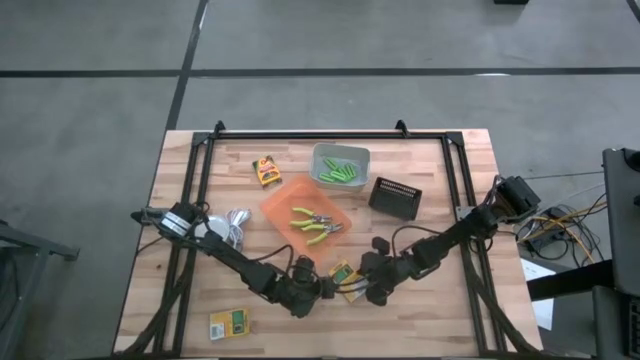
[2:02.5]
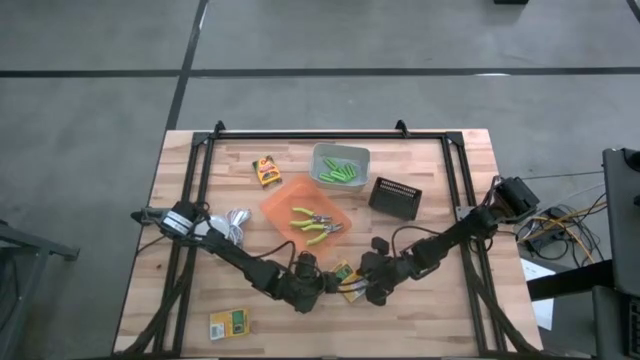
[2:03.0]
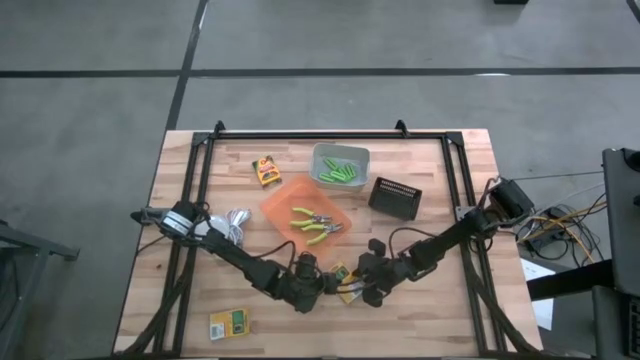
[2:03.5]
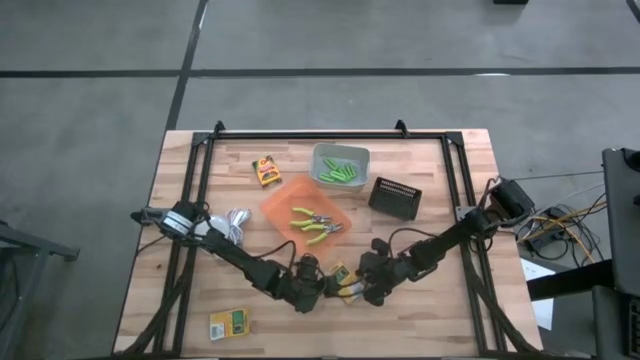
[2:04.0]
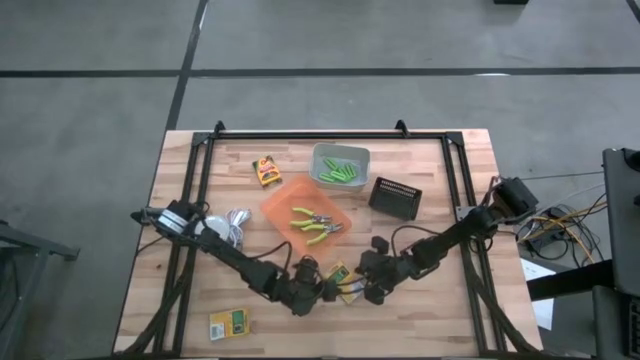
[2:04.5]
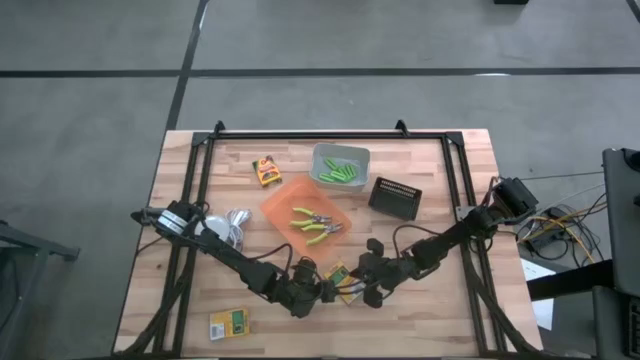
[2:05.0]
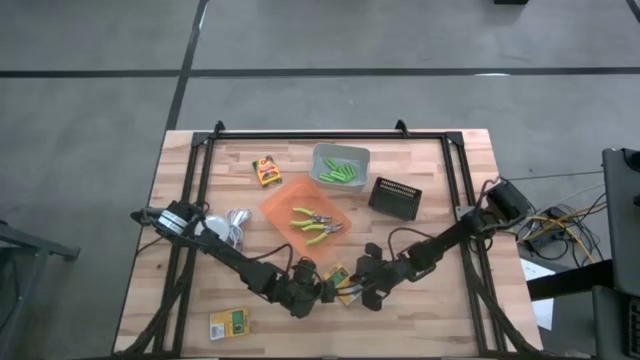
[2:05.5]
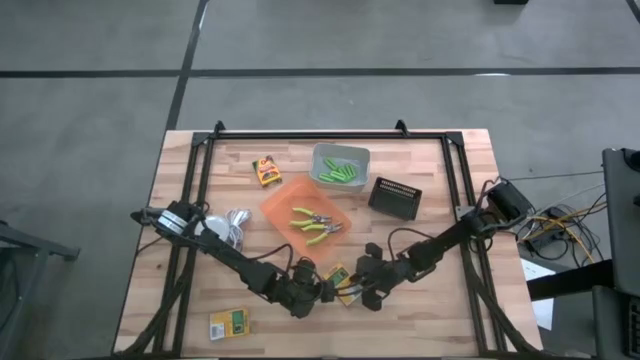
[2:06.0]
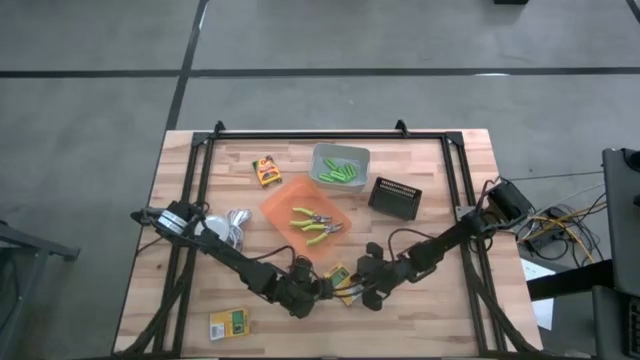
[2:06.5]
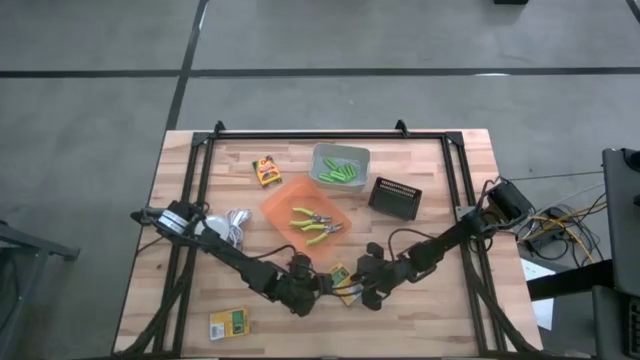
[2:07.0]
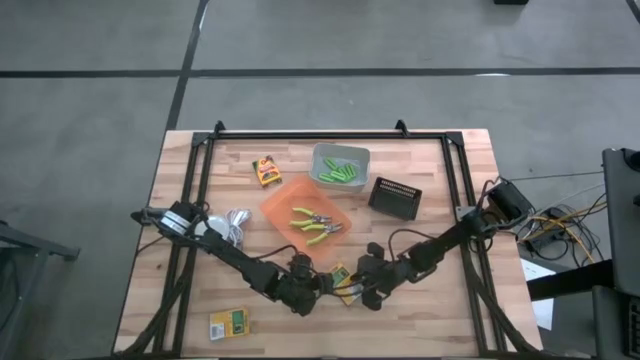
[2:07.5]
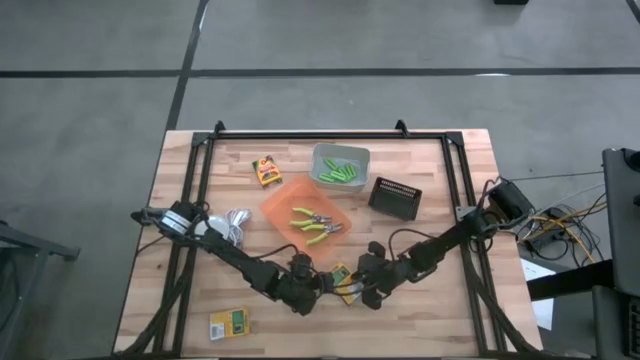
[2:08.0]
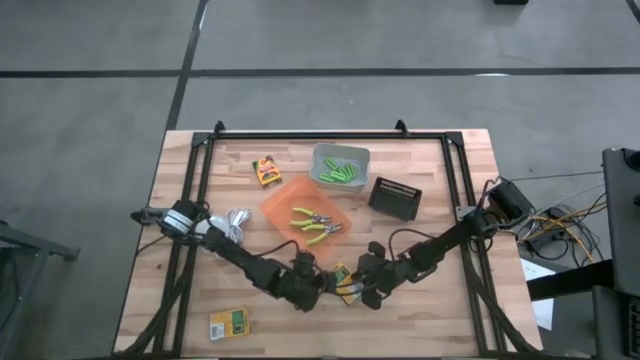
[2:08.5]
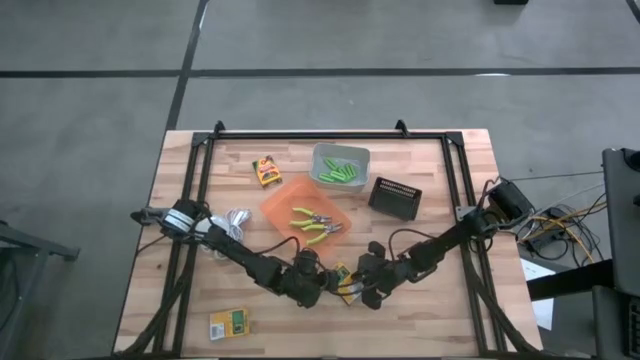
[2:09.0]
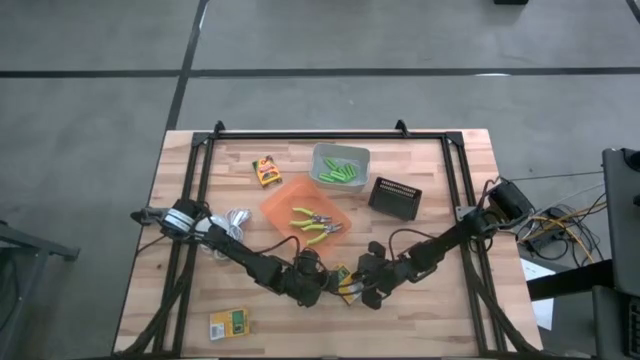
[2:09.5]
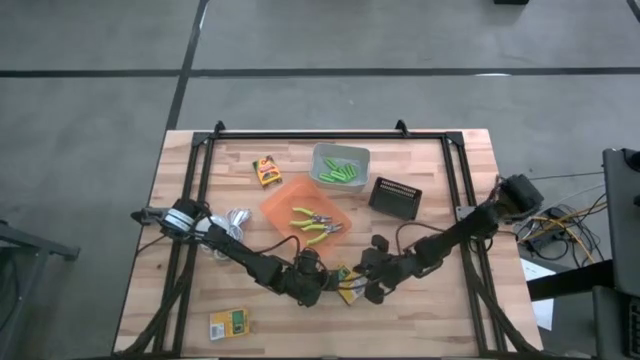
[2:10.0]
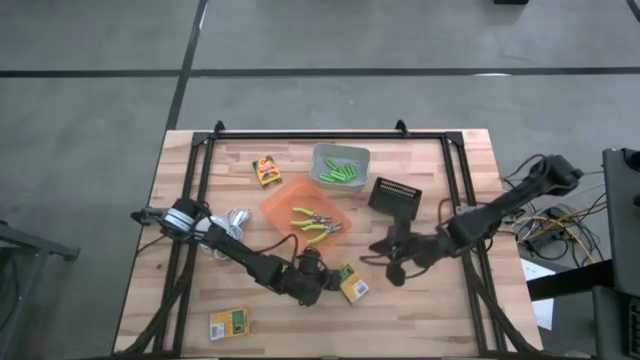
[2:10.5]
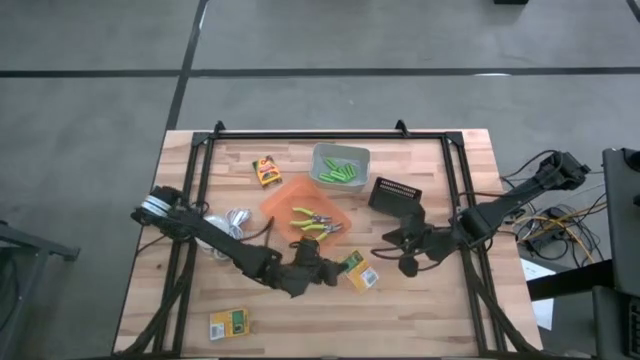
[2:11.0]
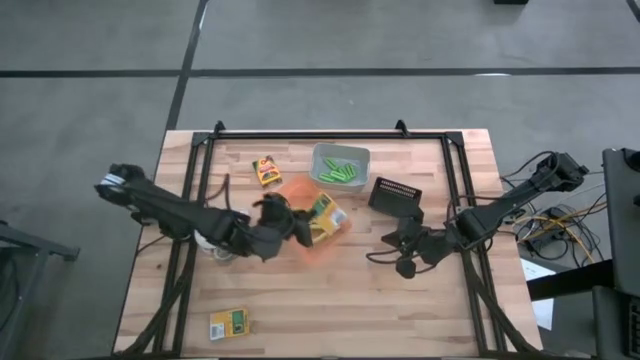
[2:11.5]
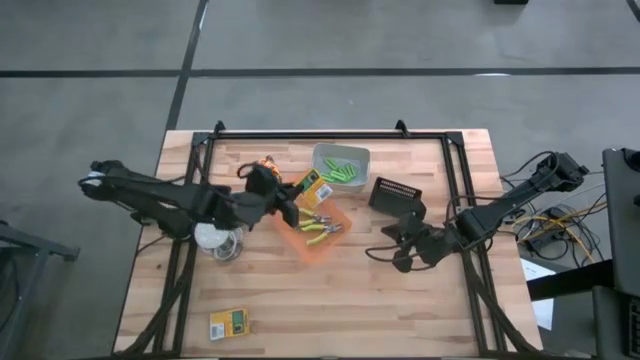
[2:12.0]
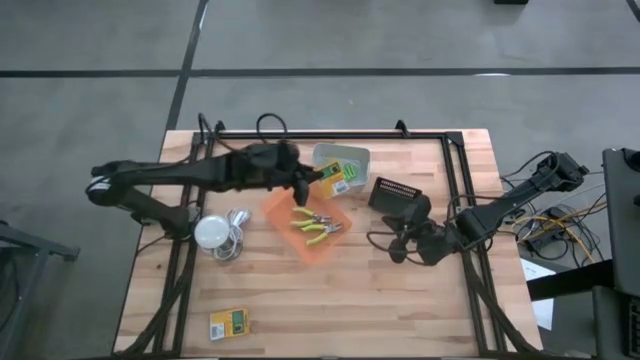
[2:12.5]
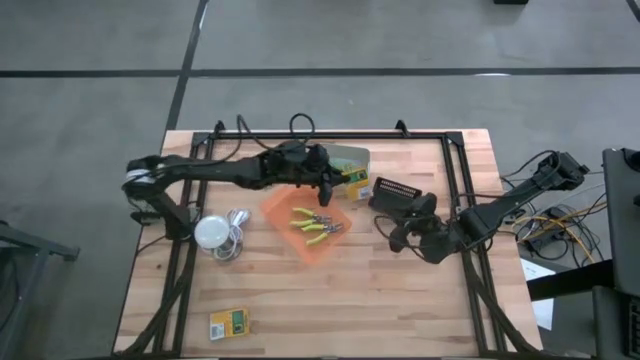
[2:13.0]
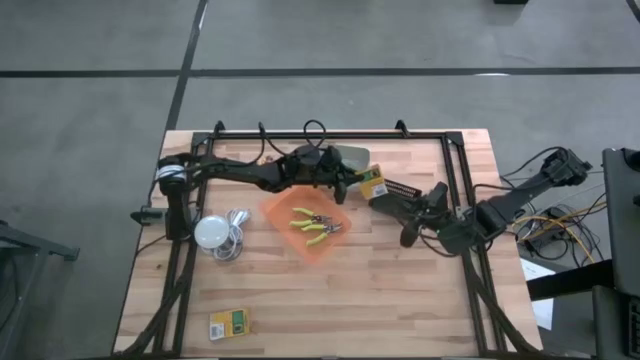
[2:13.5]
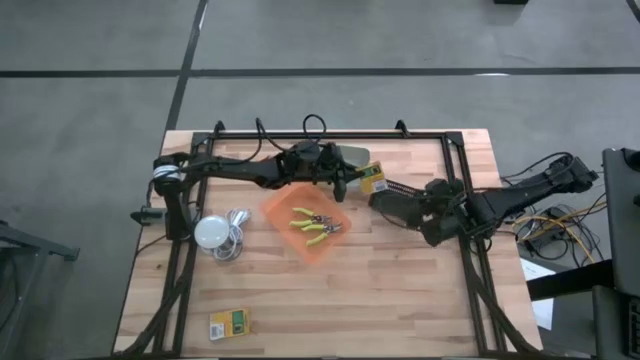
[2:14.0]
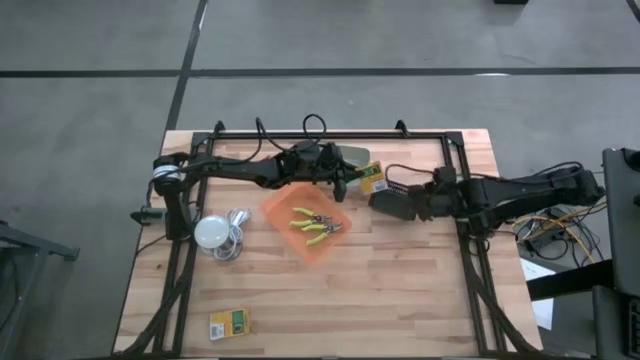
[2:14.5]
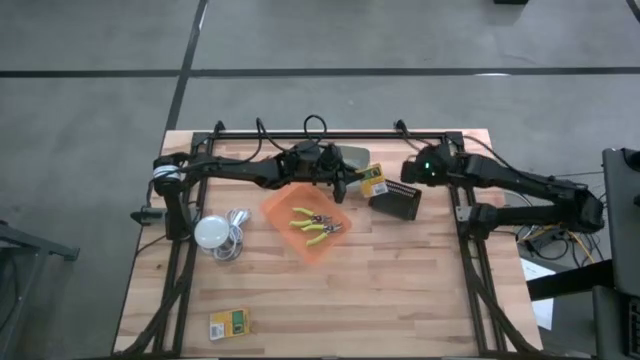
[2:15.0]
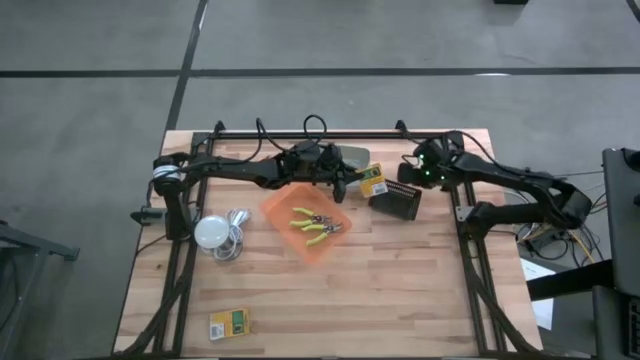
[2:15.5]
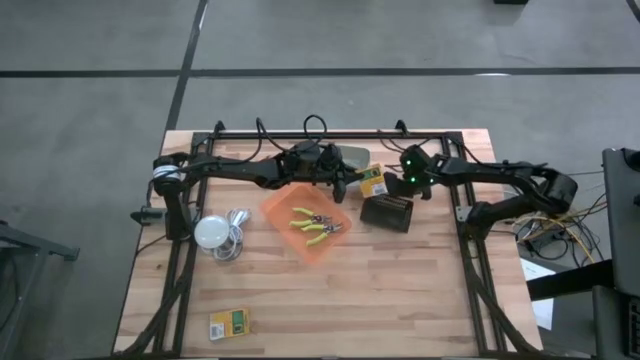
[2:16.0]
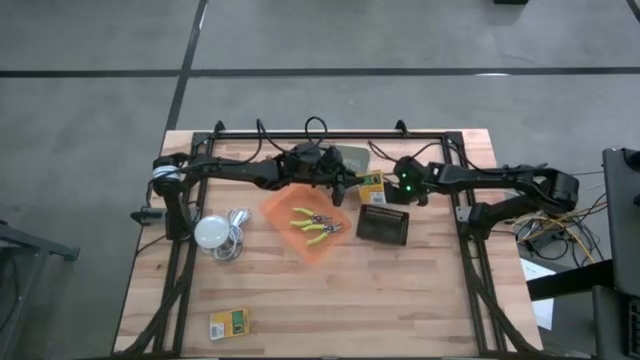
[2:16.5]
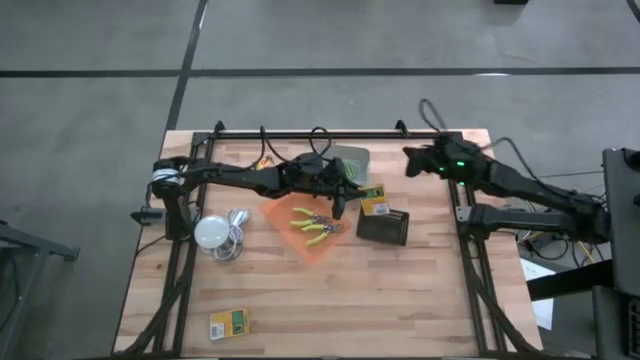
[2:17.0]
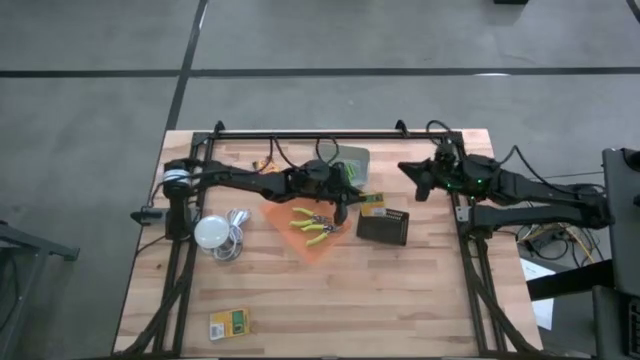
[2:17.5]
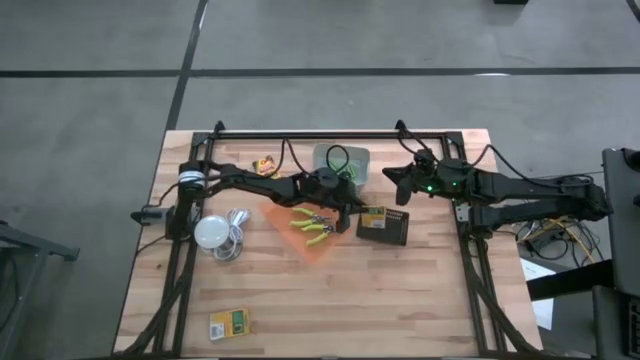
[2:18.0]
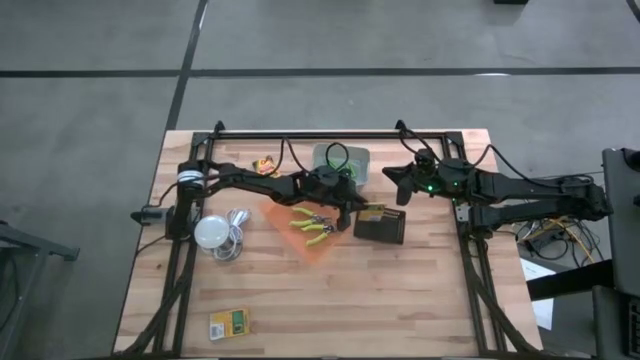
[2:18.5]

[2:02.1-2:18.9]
Task: Pick & Place School Supplies
Put the yellow crayon box into the black bin

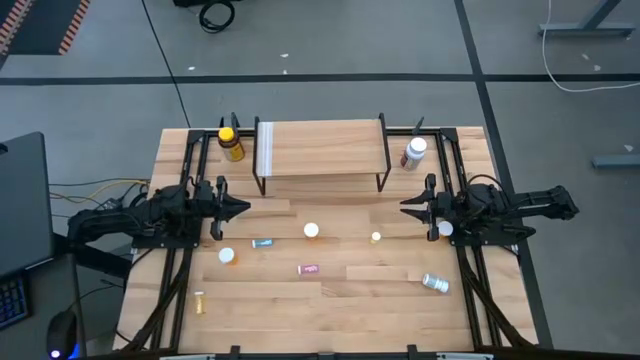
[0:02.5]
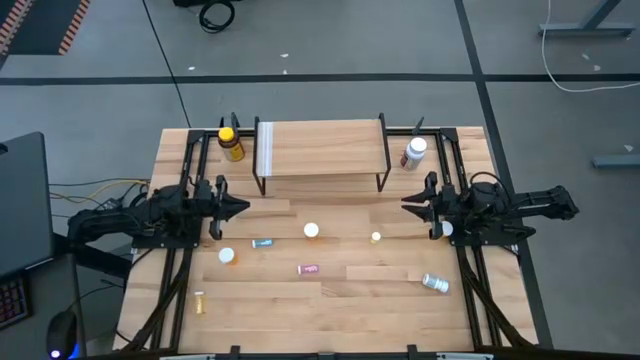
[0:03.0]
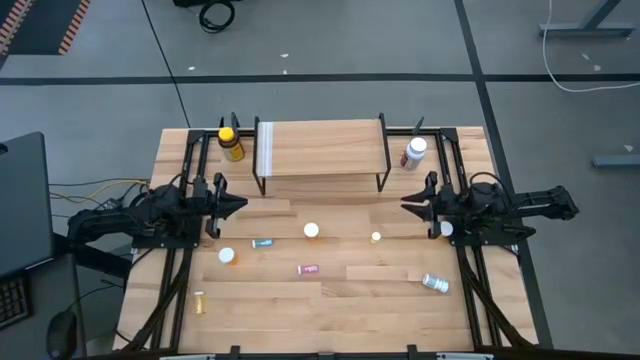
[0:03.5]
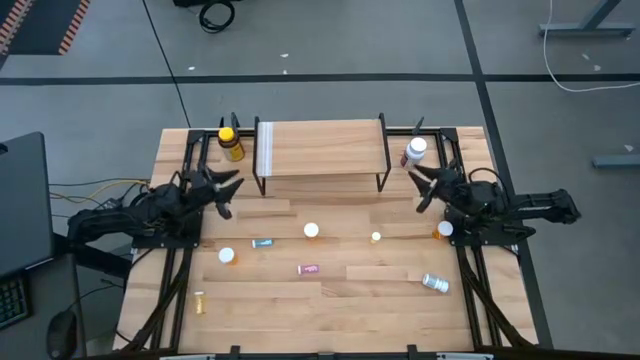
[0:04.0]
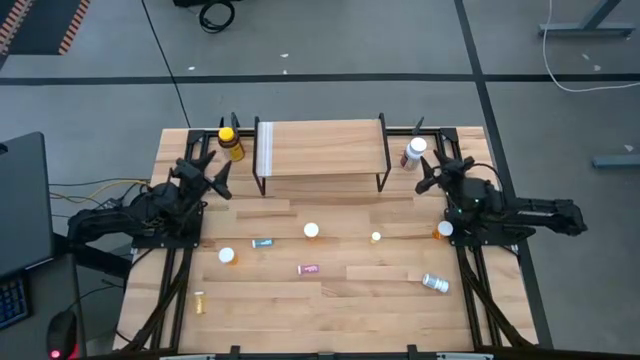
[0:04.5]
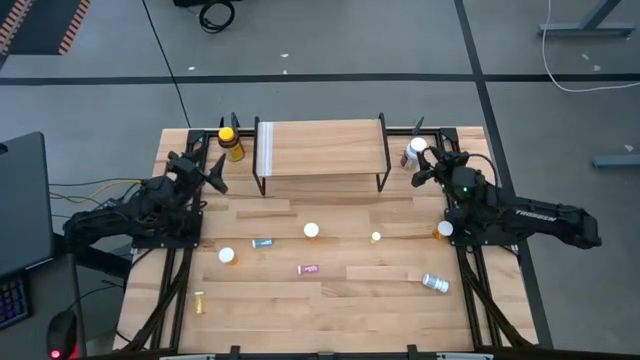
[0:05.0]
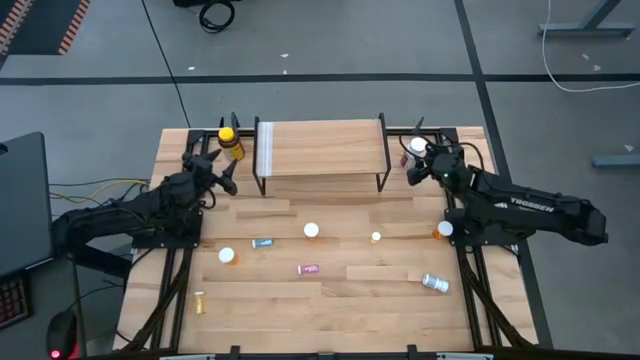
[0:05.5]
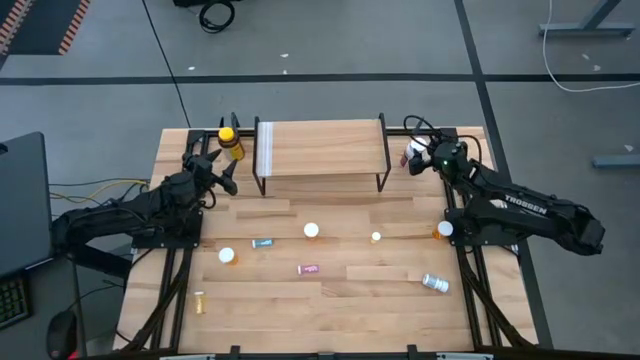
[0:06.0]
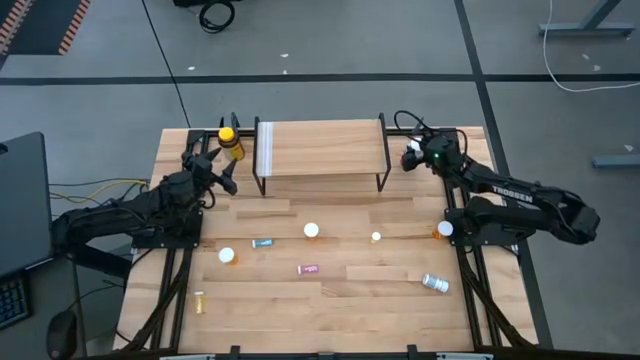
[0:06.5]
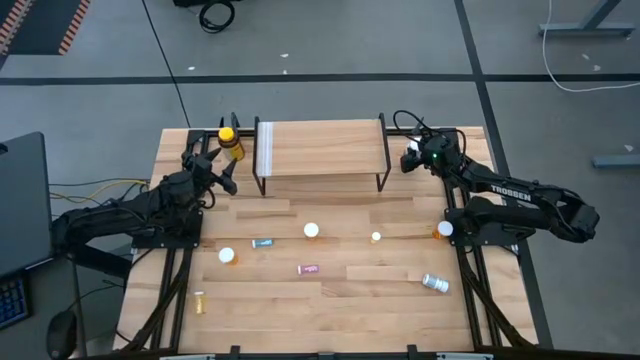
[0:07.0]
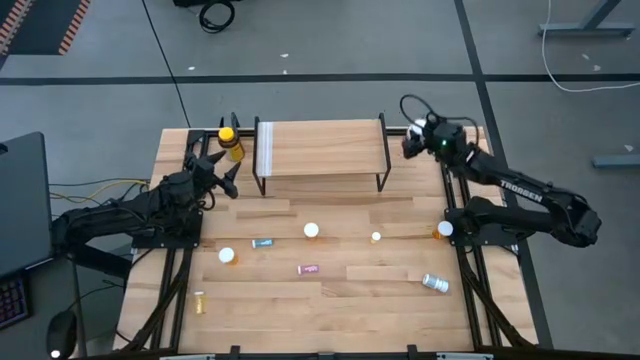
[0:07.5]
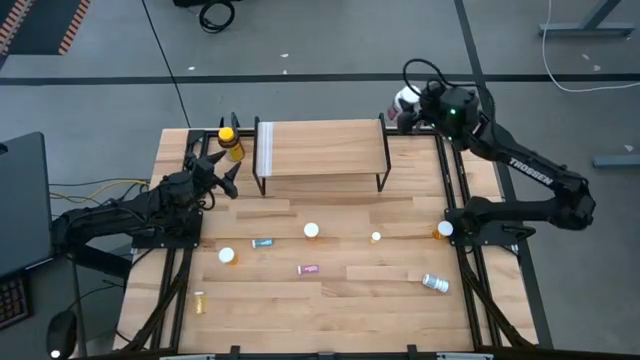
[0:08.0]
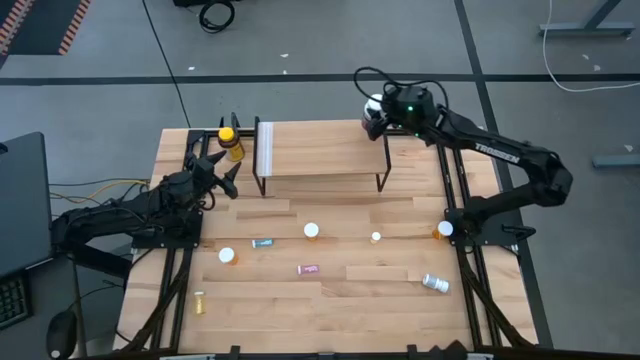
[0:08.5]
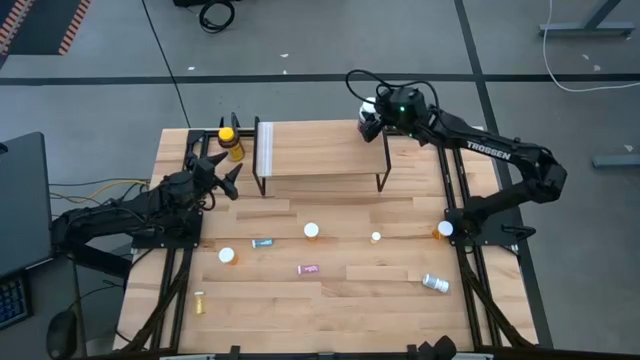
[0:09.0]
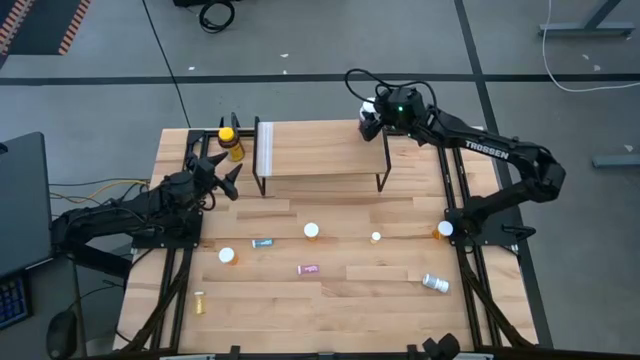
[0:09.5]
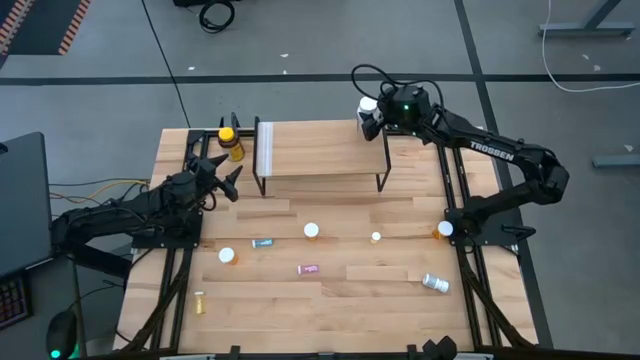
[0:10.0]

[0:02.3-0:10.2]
Task: Pick and place medicine bottles onto shelf by color
Put the large white pill bottle on the shelf
